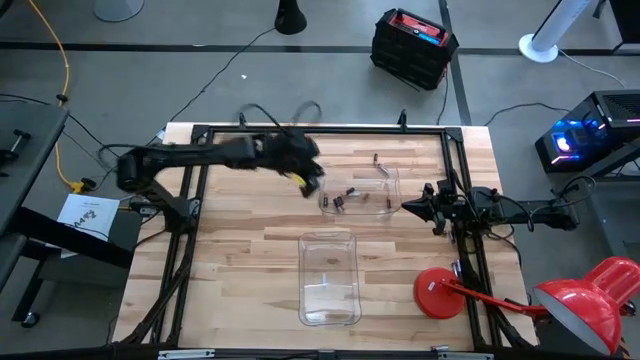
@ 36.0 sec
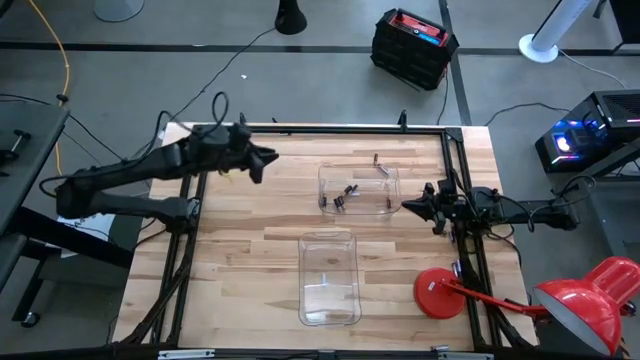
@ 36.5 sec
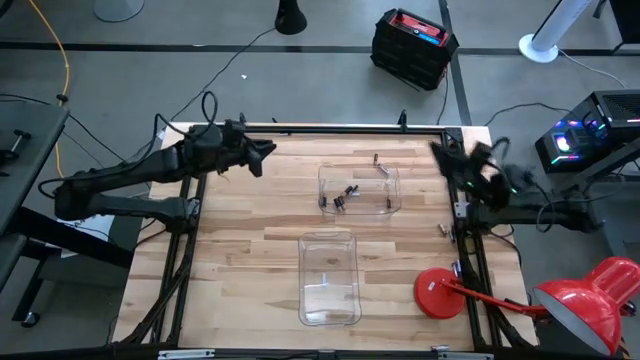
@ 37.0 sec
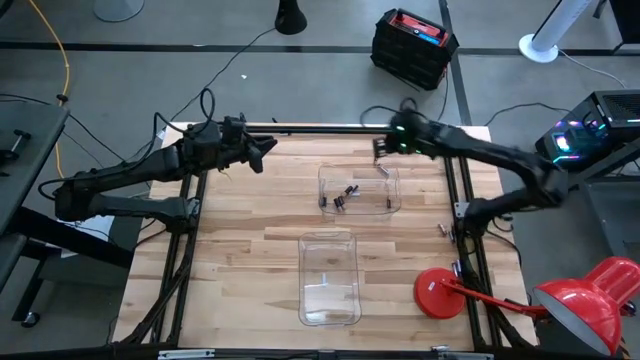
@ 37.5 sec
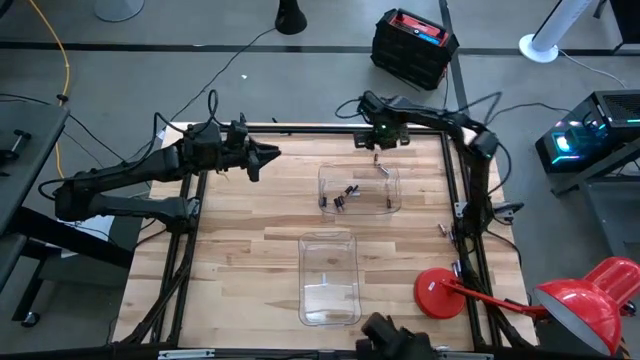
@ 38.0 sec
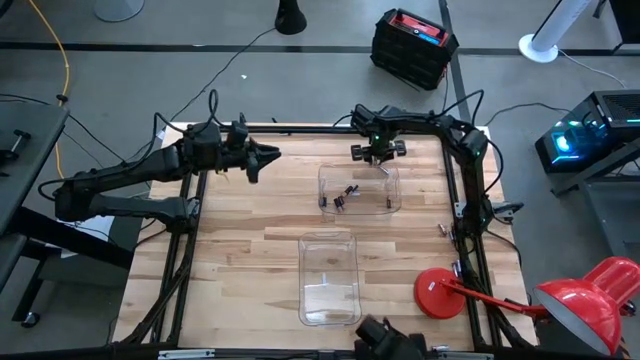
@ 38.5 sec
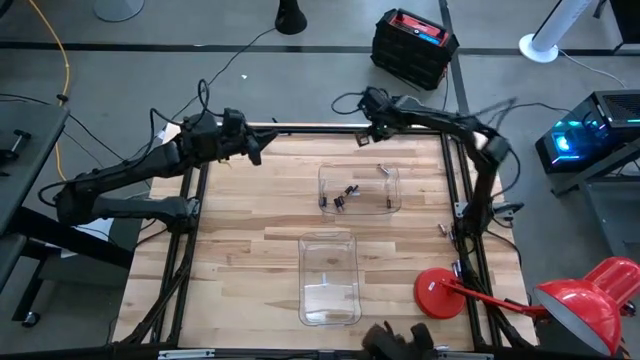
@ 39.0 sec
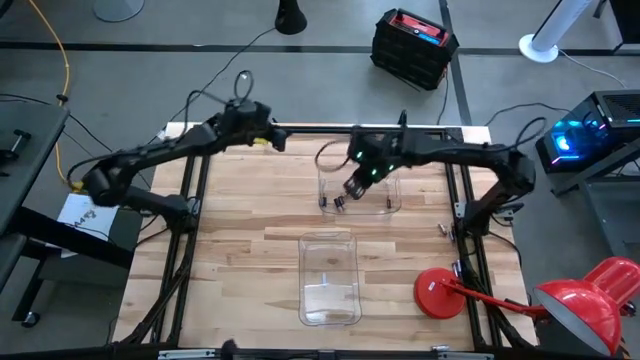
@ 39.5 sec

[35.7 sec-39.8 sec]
Task: Sort batteries
Put the black battery into the top transparent bin

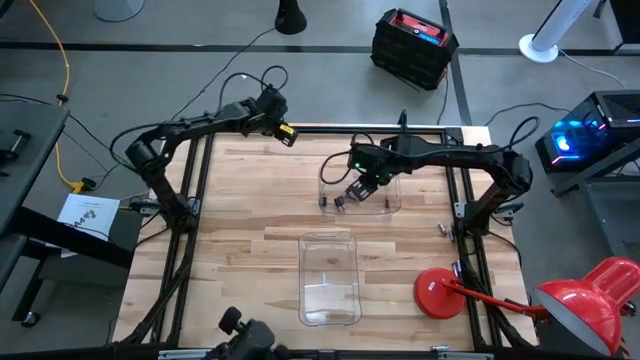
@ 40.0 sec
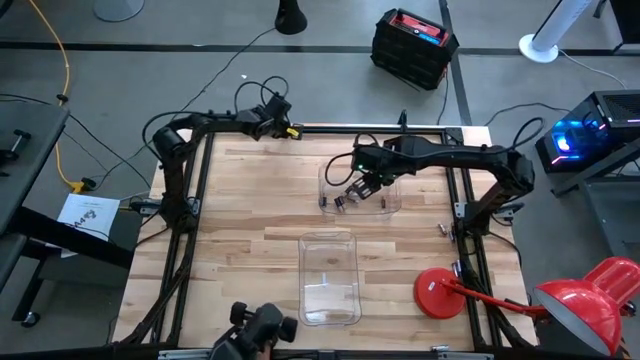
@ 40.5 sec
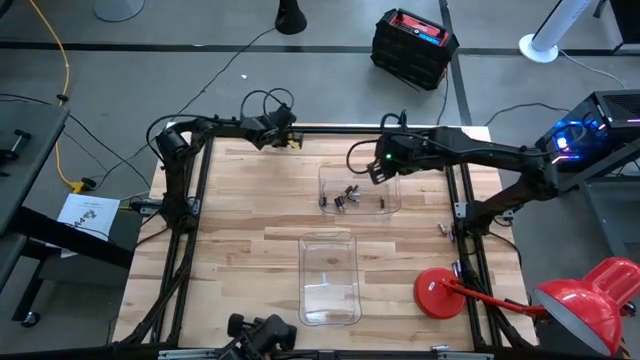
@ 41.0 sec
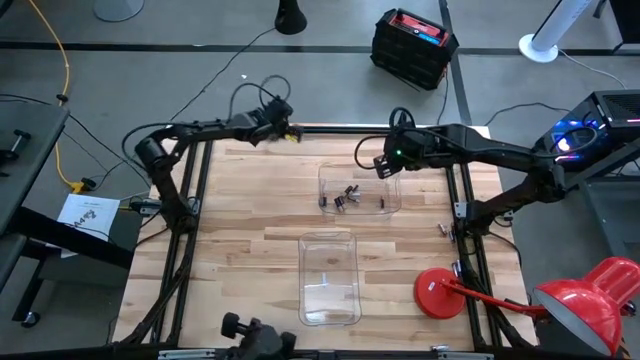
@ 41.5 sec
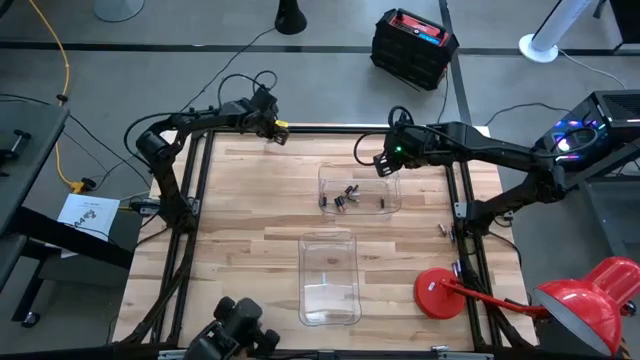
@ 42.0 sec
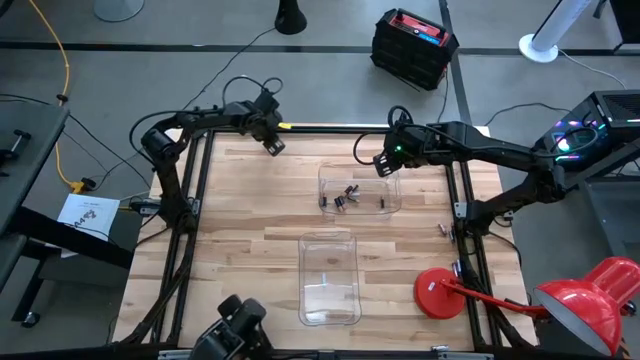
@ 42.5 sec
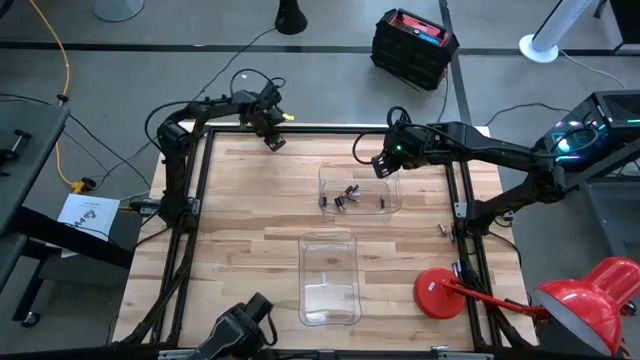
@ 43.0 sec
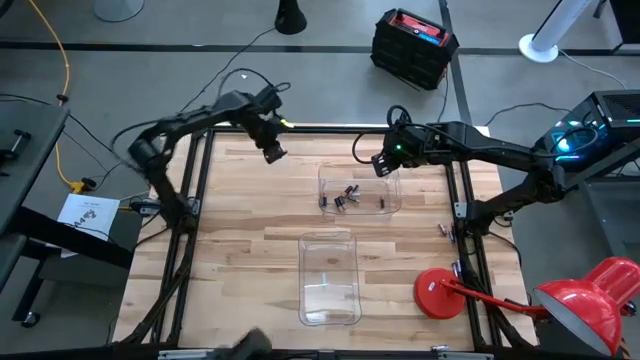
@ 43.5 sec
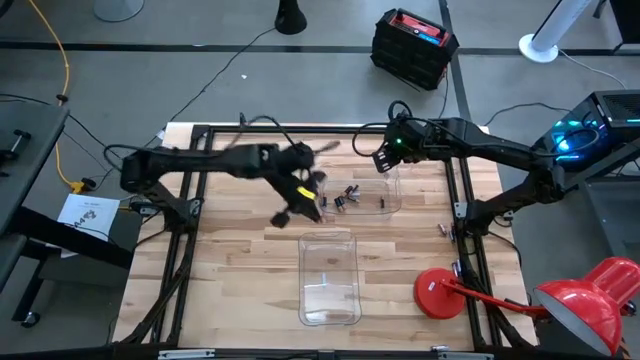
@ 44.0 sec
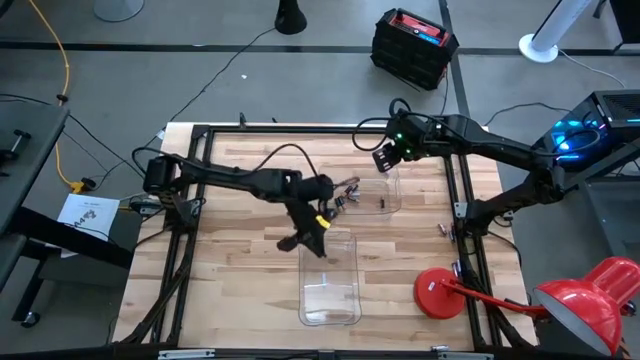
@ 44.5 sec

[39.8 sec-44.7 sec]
Put the silver battery into the bottom transparent bin

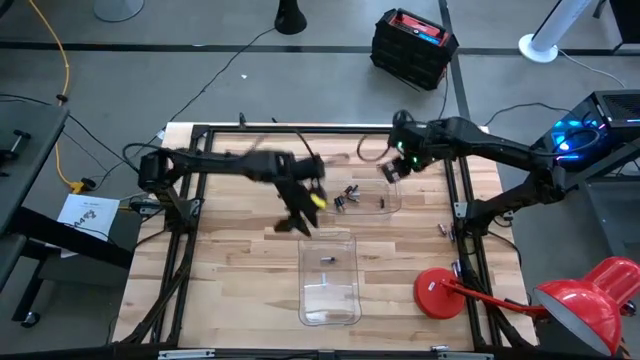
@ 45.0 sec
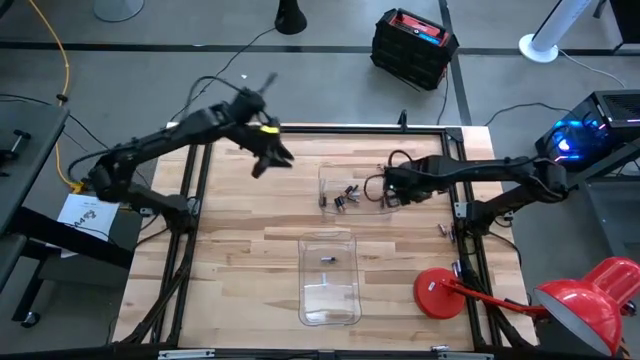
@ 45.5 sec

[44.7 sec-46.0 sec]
Adjust the top transparent bin

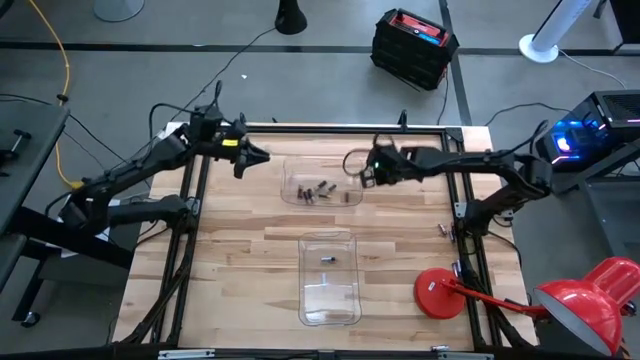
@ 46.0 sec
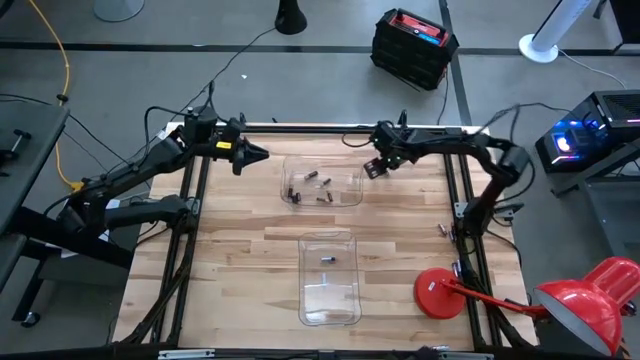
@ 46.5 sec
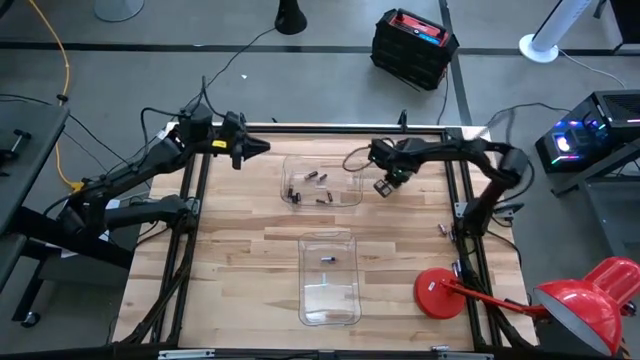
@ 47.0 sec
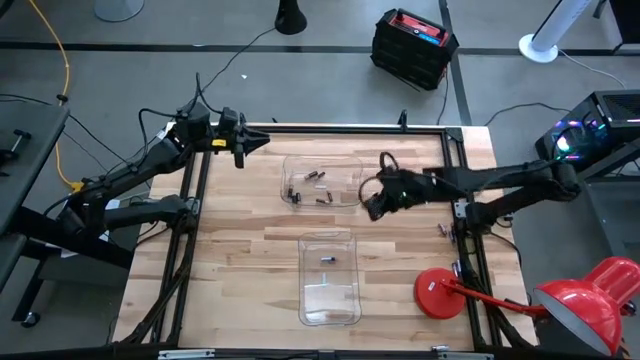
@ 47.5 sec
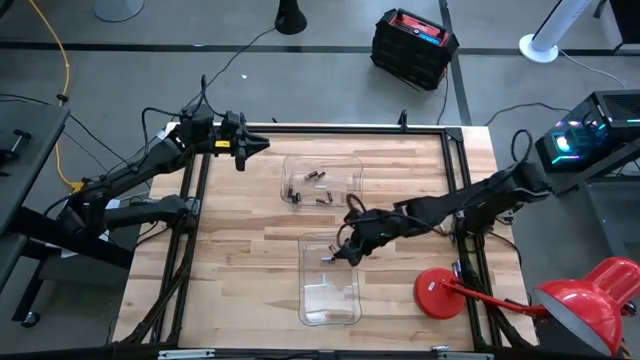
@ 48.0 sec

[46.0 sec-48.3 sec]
Put the silver battery into the bottom transparent bin

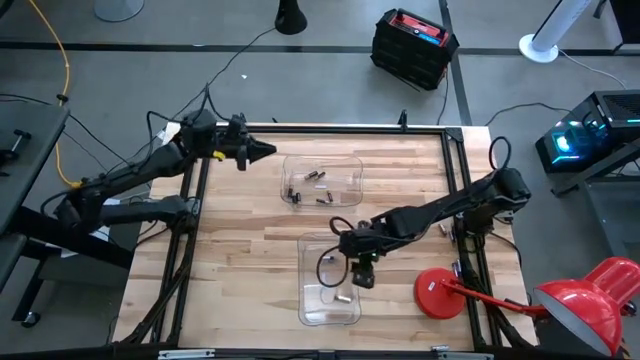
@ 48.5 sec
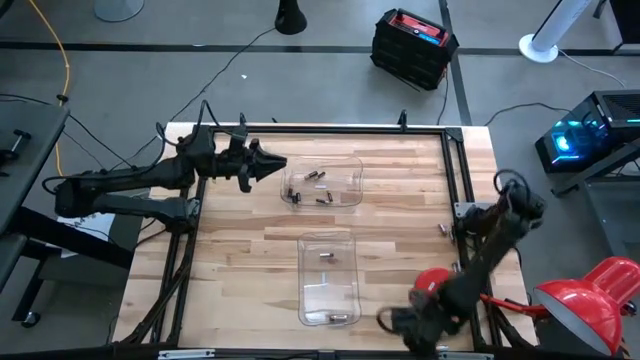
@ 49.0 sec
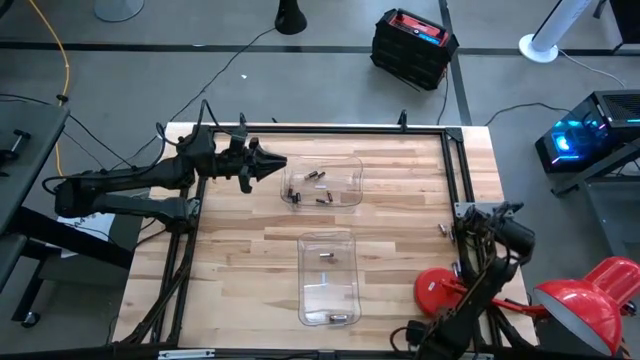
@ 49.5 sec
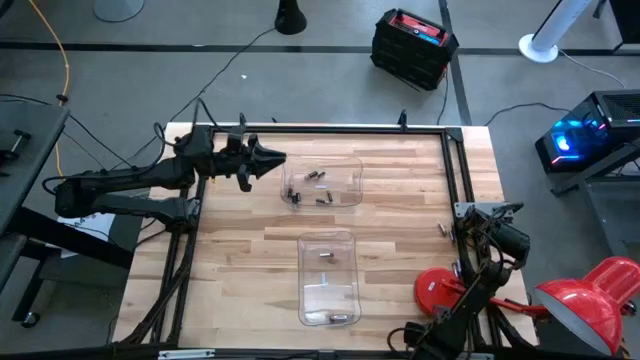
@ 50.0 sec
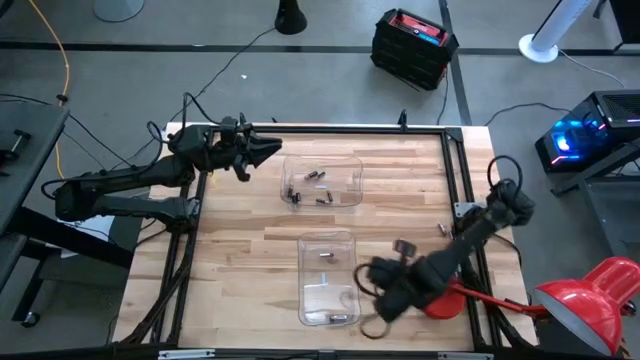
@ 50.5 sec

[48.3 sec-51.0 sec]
Put the silver battery into the bottom transparent bin

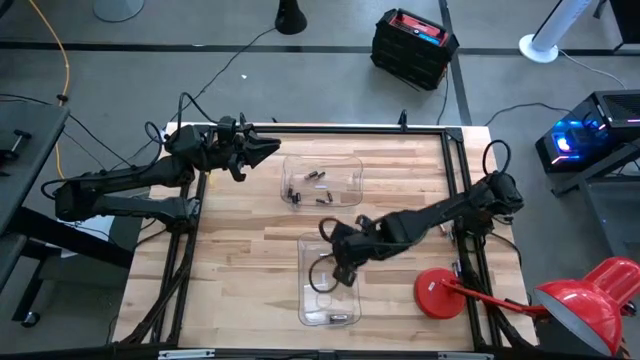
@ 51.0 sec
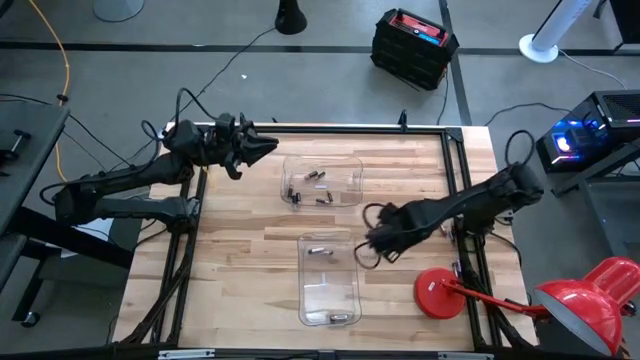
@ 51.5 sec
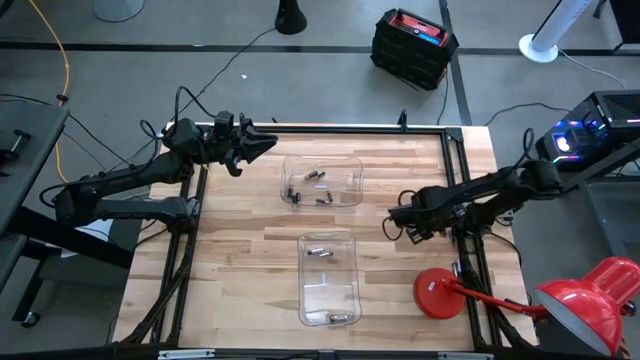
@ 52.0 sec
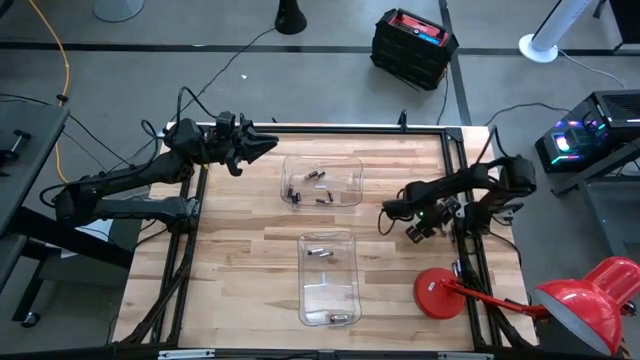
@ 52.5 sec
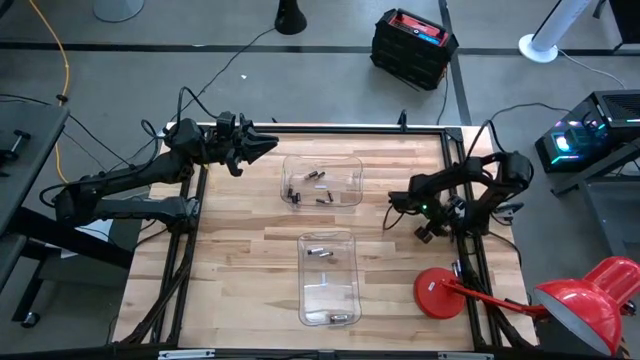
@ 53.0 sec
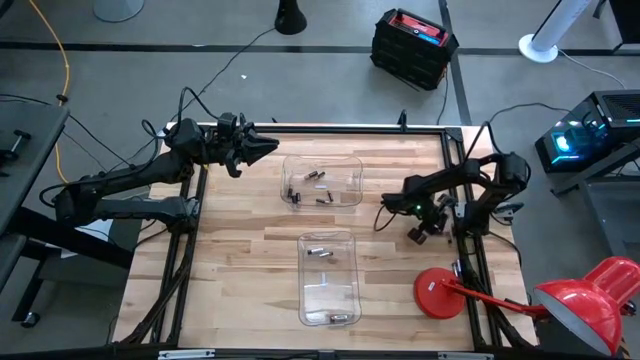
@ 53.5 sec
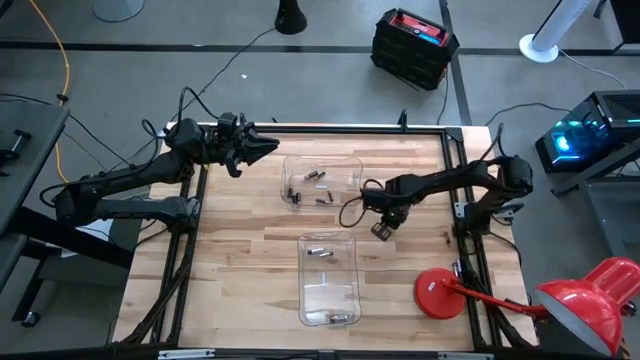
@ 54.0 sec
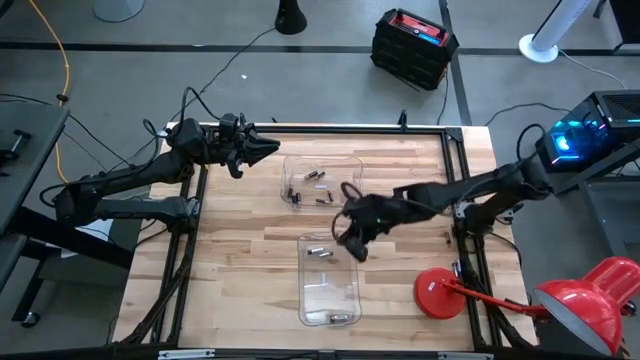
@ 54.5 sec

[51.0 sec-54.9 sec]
Put the silver battery into the bottom transparent bin

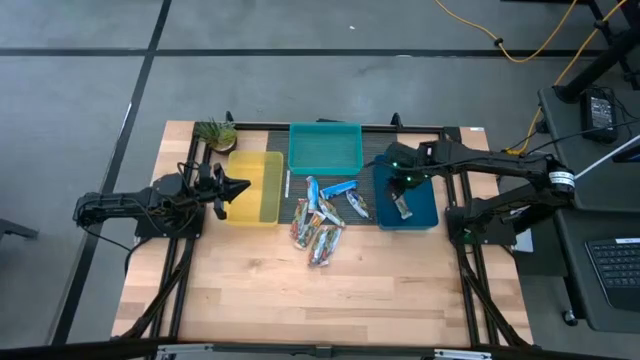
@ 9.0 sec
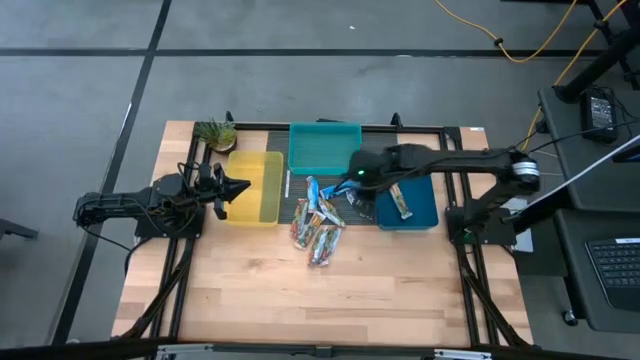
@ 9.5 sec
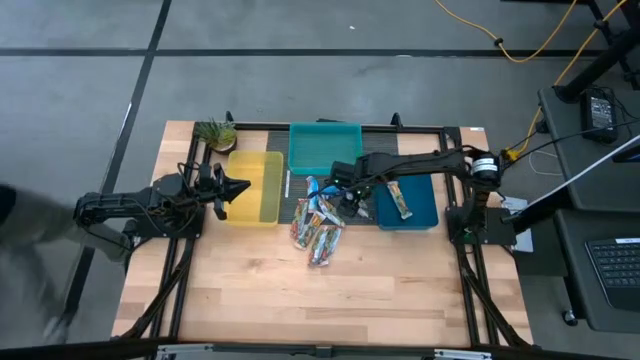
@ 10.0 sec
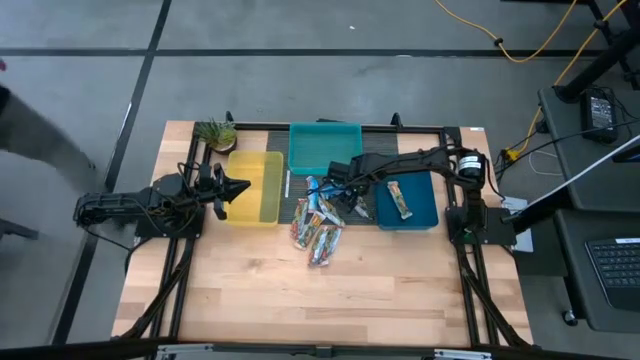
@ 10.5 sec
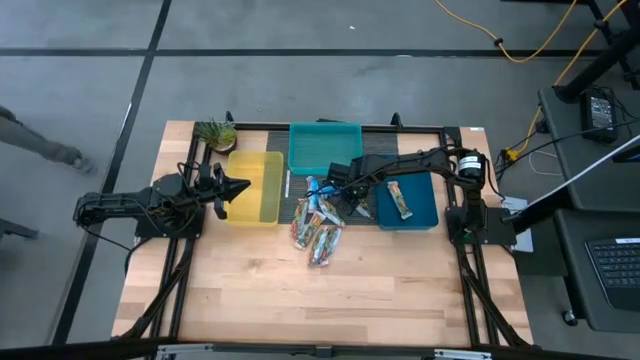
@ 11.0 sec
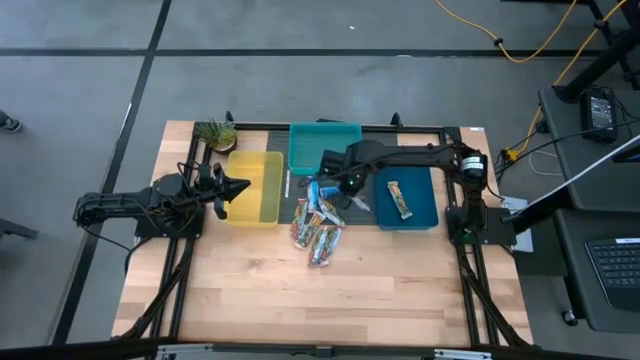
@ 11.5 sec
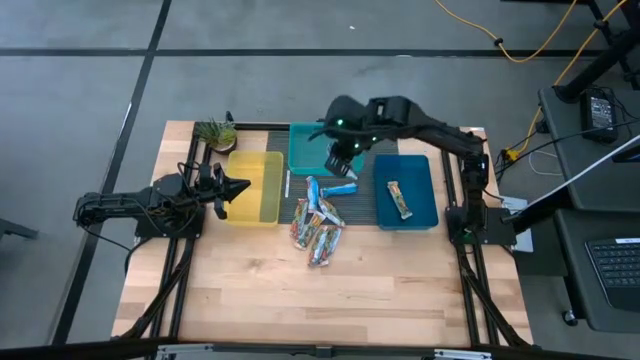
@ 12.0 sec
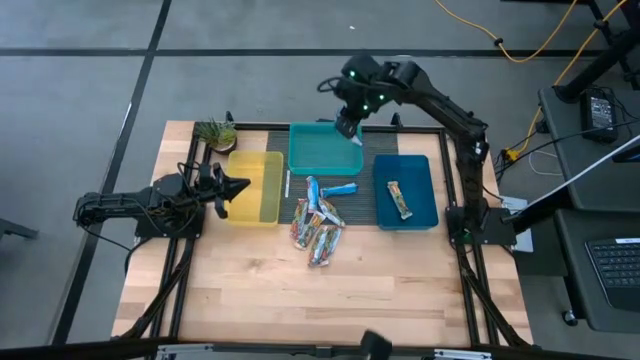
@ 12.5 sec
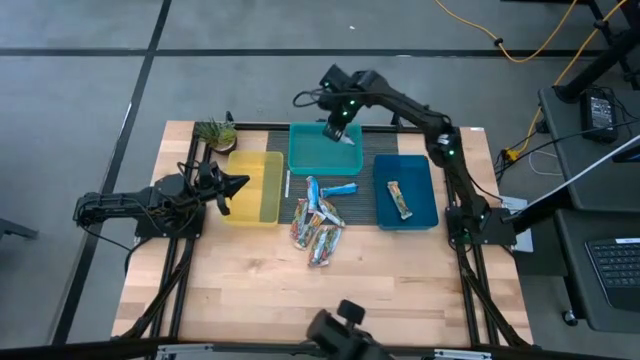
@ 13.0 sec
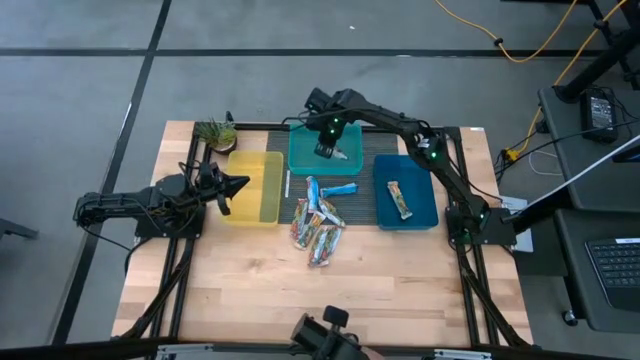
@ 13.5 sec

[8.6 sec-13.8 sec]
Task: Pick and place Granola Bars by type
Put the bottom purple granola bar into the green bin
